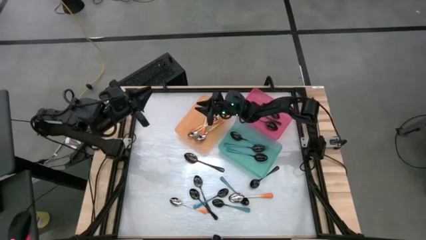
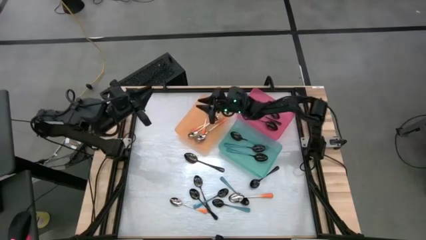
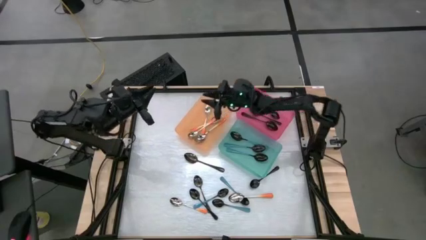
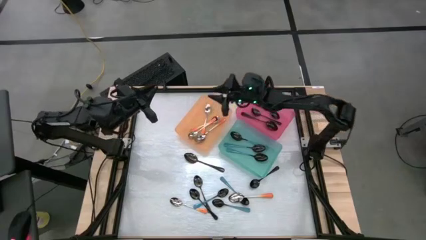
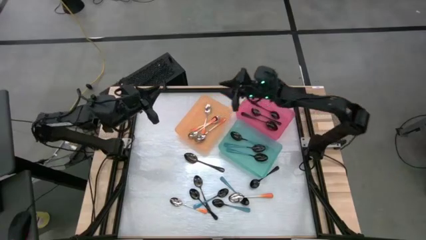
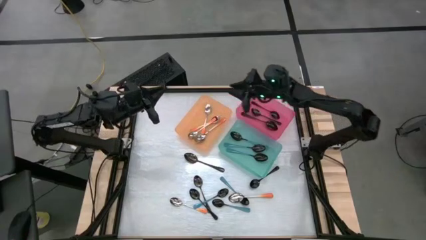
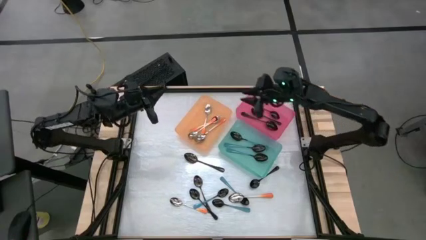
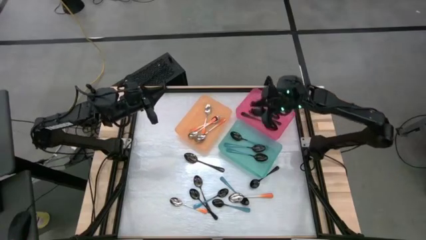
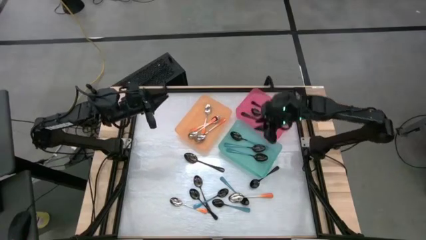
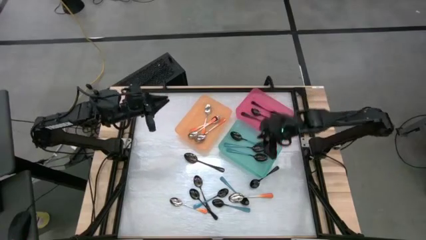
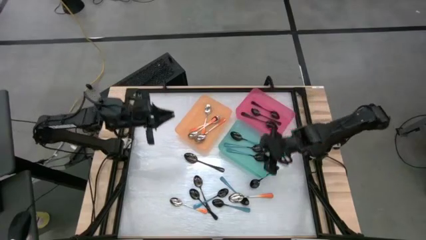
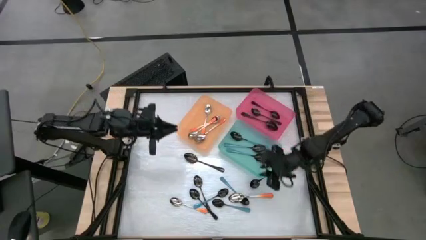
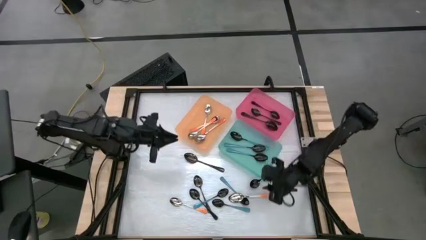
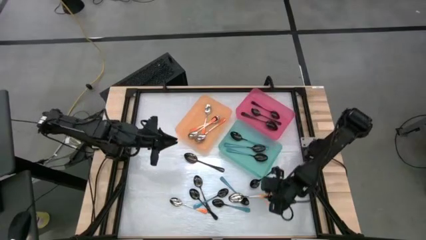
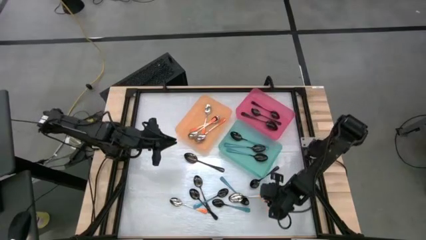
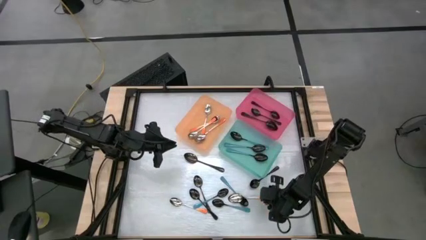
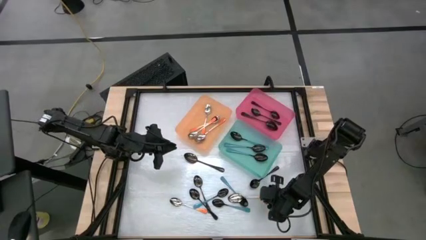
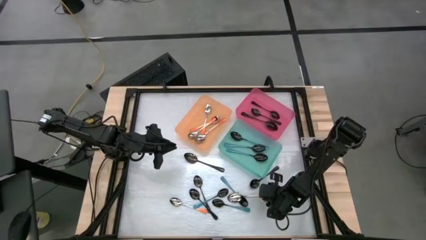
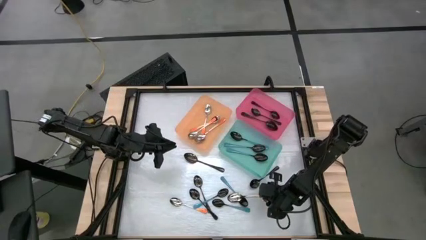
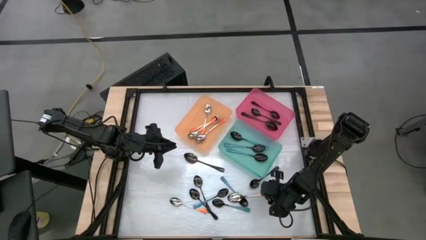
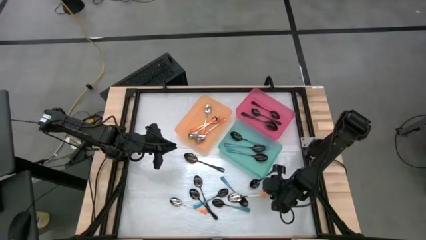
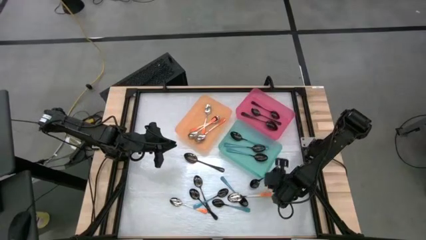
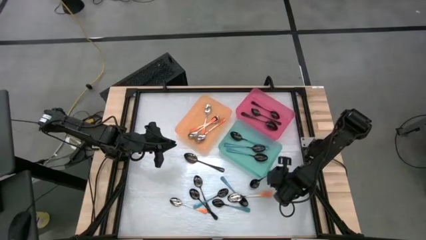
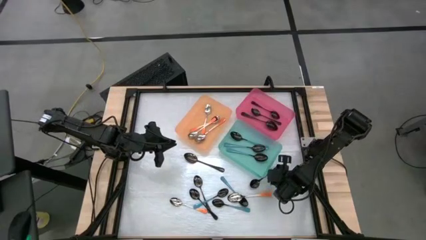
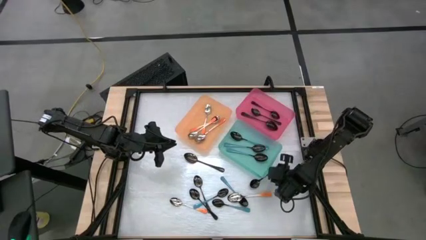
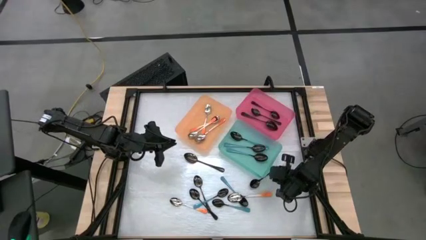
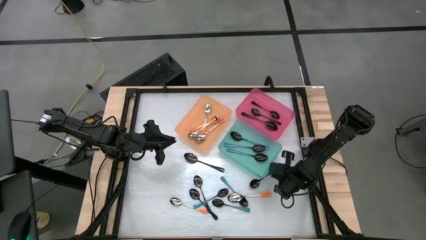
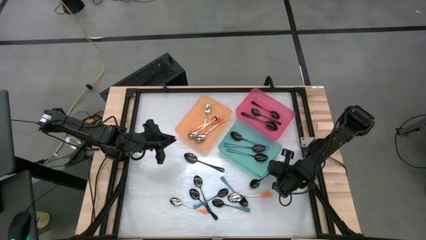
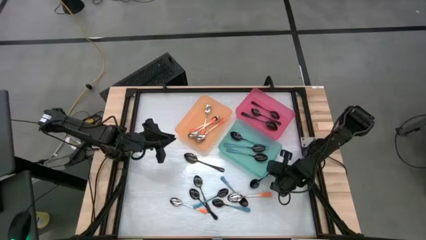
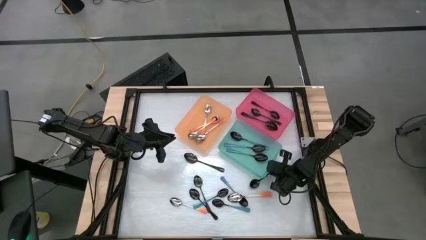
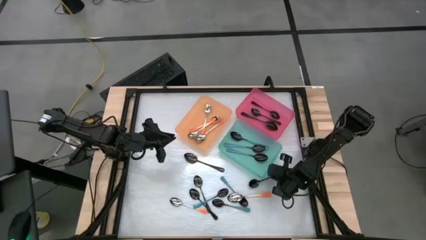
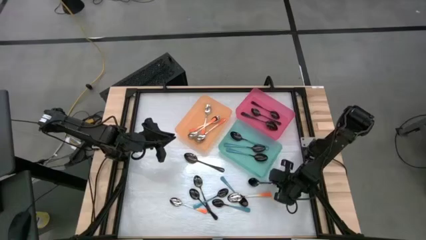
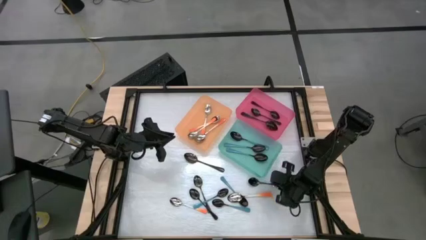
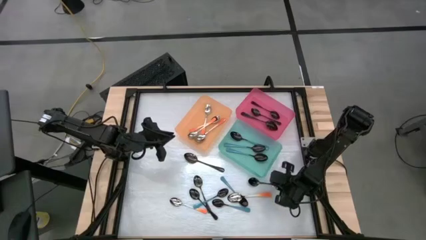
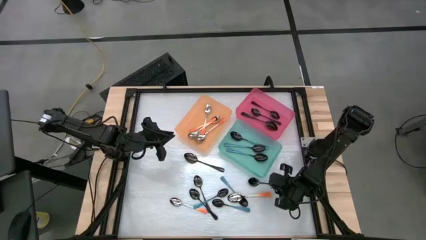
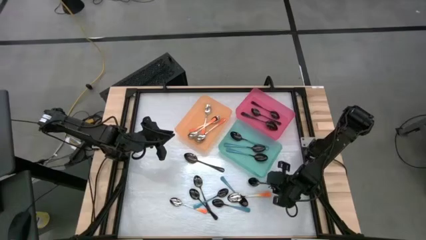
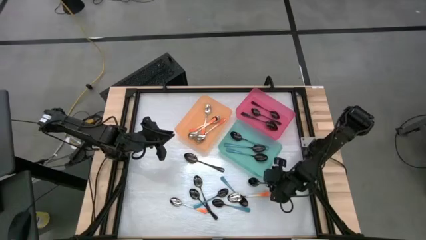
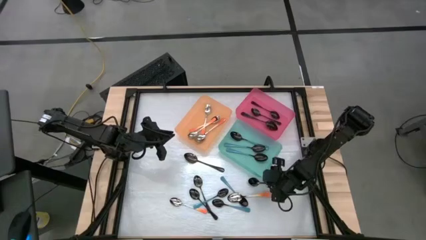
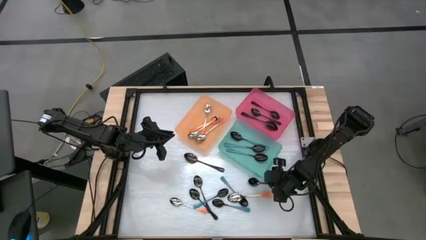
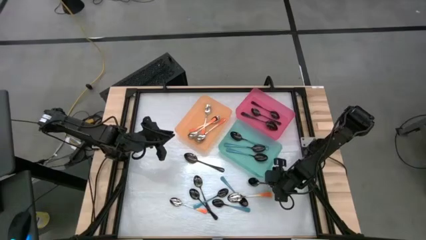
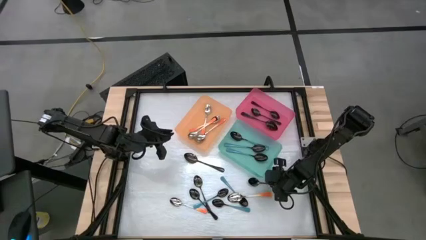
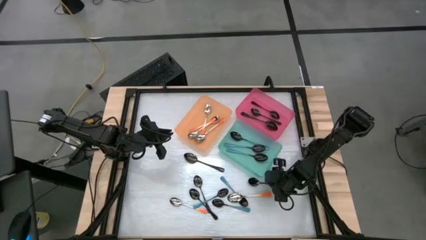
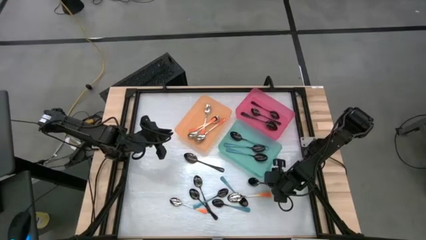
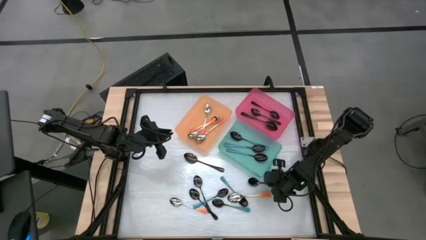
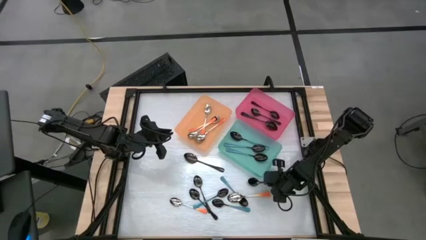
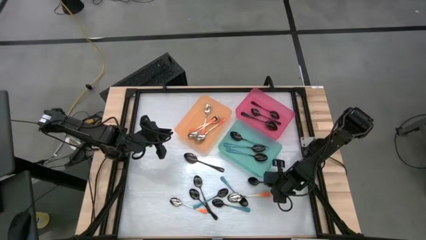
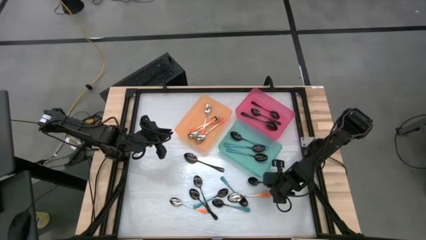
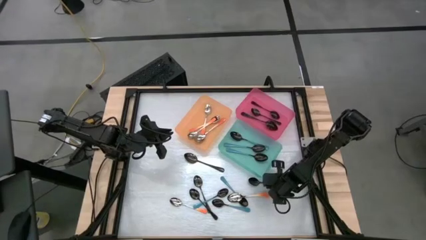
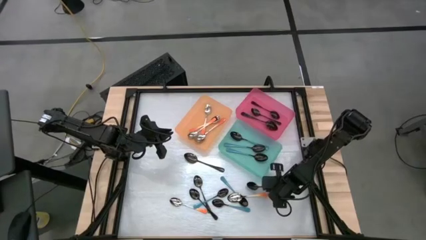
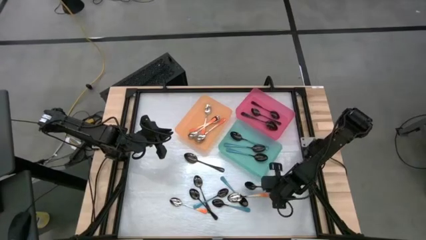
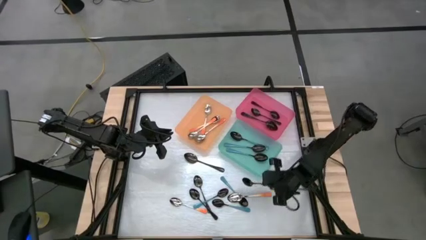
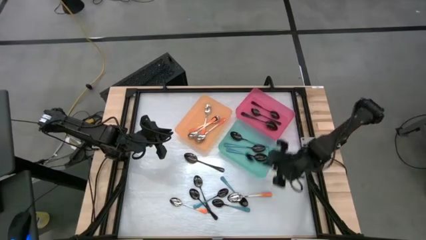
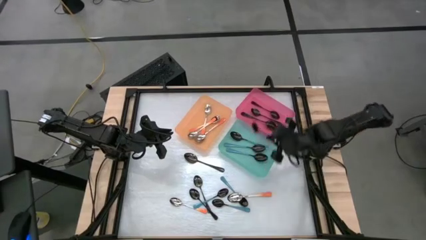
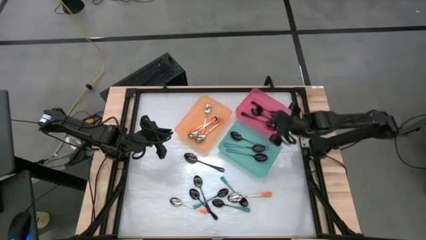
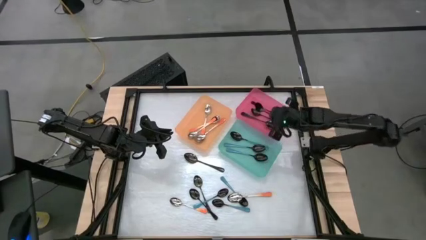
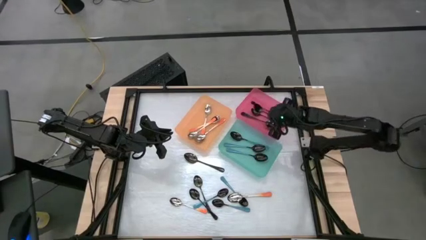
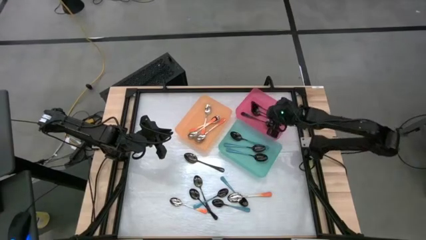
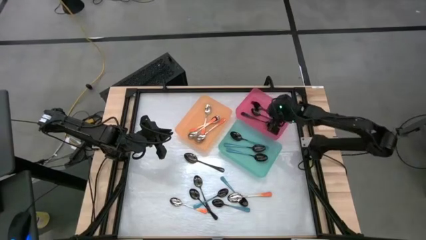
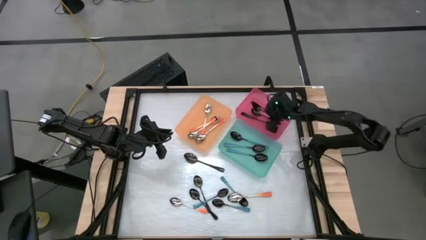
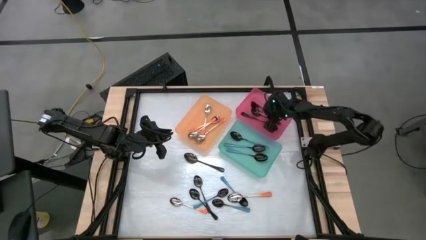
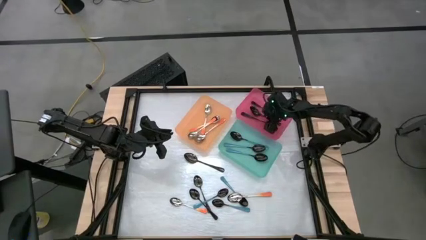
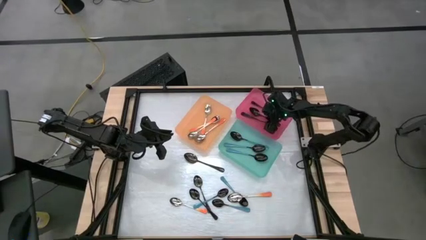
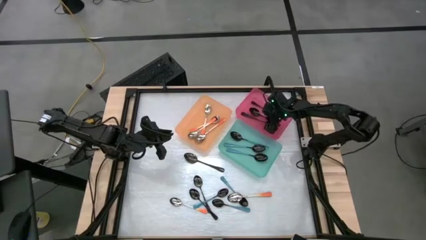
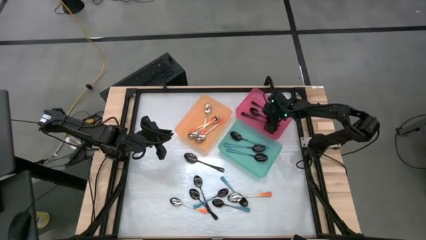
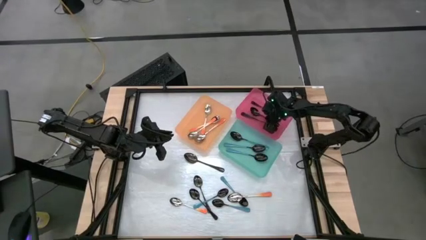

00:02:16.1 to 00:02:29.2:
Task: Sort silverware by color (type)
Put the black spoon into the pink bin
